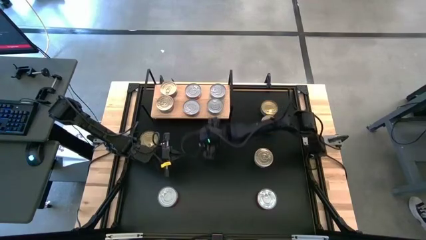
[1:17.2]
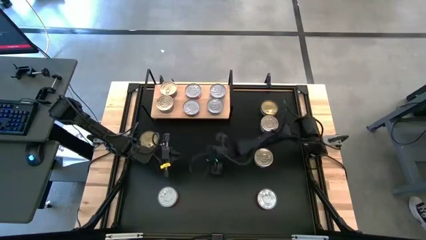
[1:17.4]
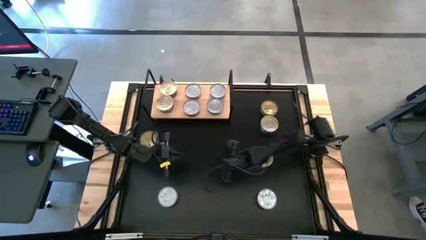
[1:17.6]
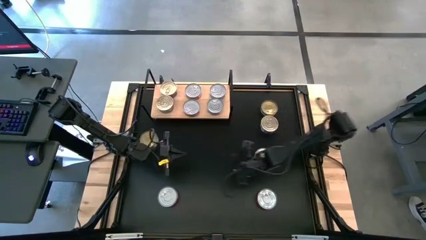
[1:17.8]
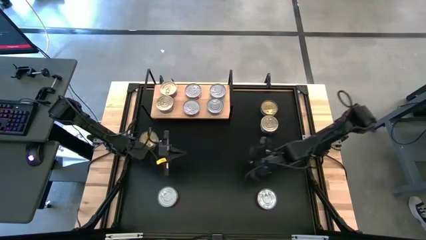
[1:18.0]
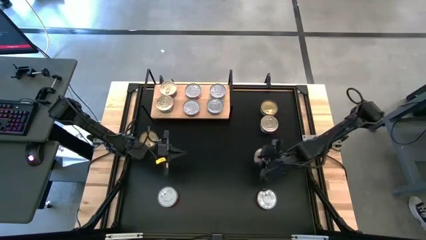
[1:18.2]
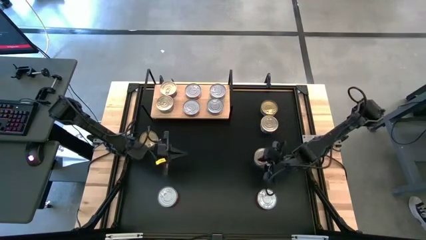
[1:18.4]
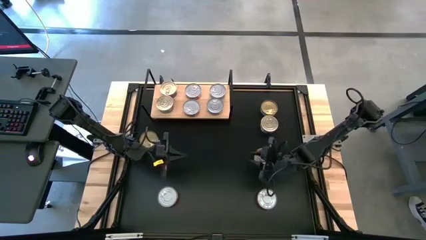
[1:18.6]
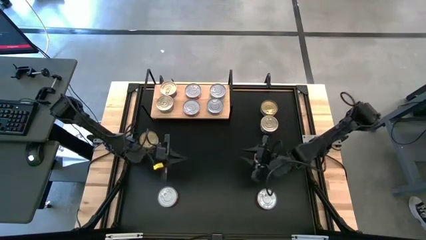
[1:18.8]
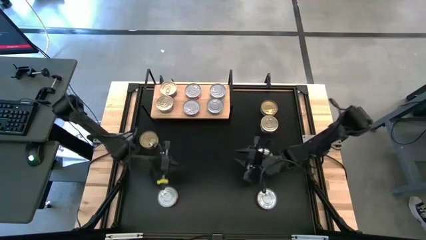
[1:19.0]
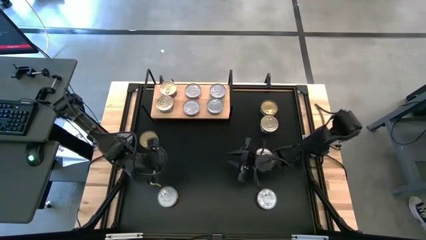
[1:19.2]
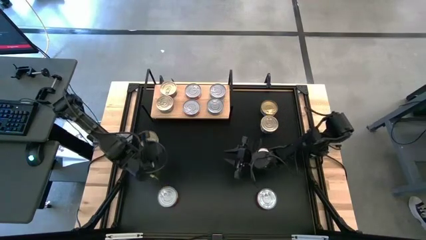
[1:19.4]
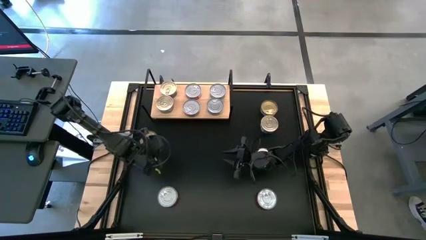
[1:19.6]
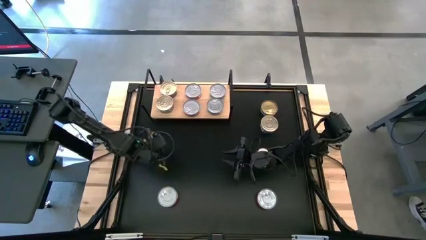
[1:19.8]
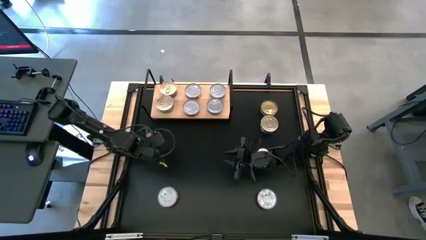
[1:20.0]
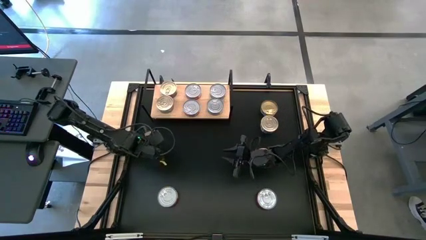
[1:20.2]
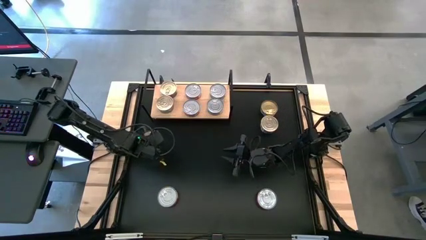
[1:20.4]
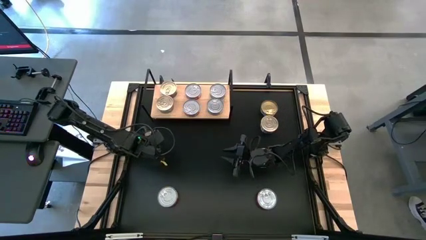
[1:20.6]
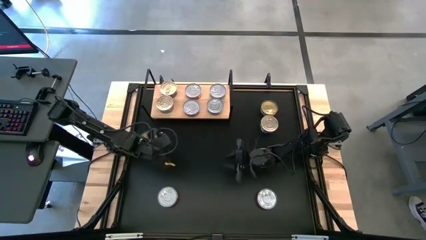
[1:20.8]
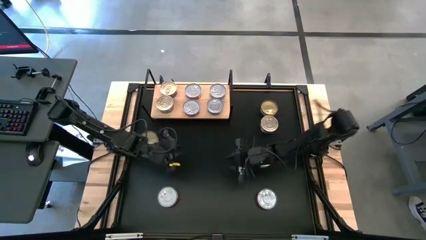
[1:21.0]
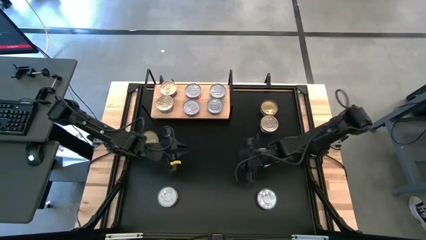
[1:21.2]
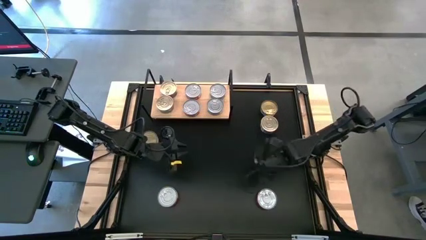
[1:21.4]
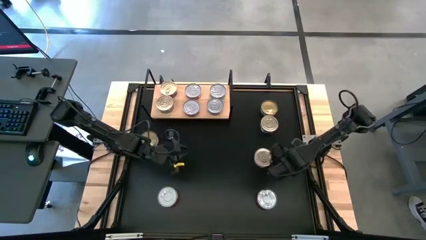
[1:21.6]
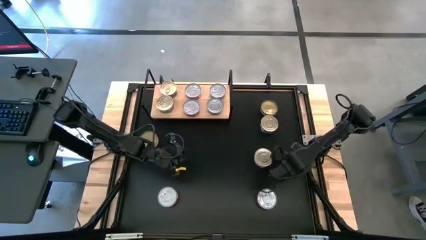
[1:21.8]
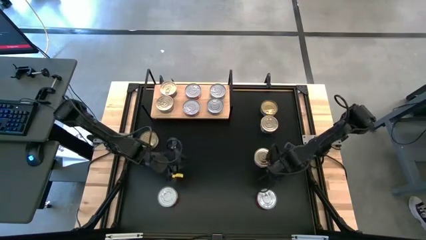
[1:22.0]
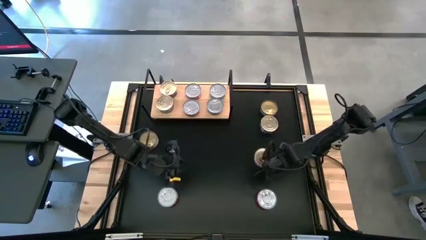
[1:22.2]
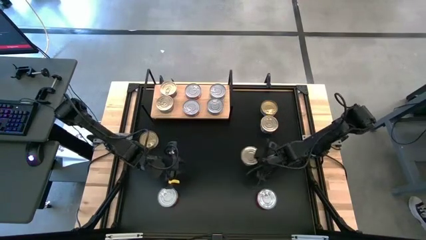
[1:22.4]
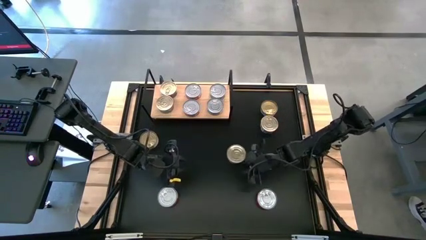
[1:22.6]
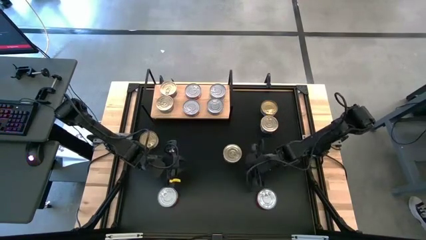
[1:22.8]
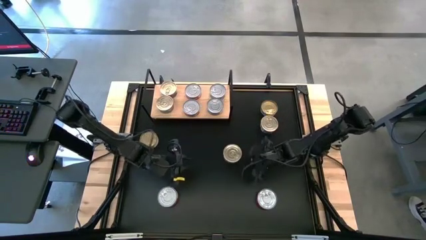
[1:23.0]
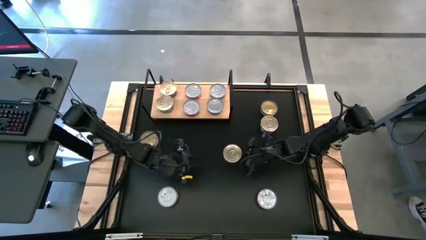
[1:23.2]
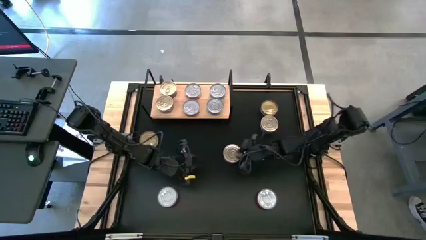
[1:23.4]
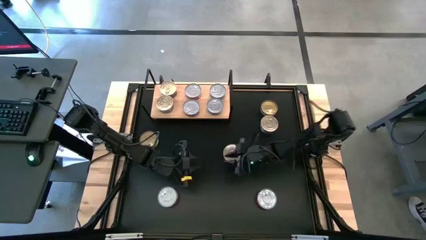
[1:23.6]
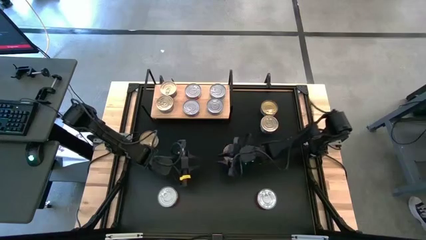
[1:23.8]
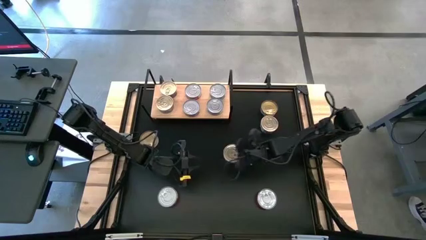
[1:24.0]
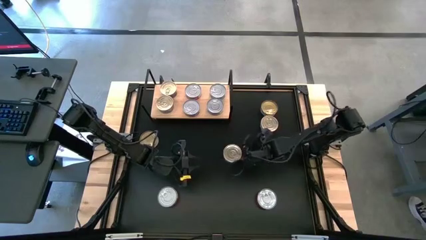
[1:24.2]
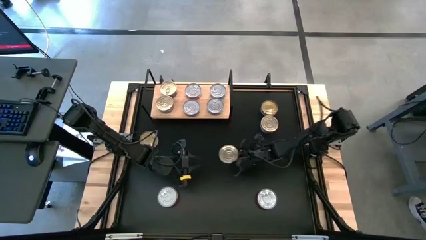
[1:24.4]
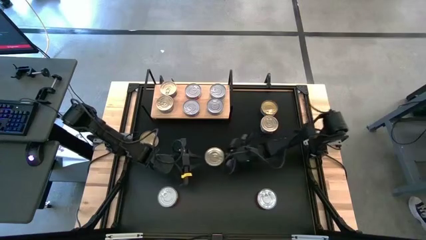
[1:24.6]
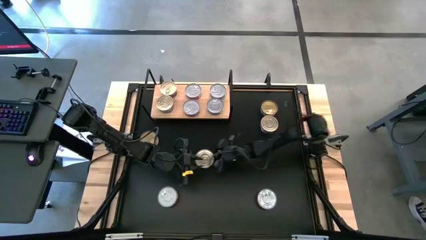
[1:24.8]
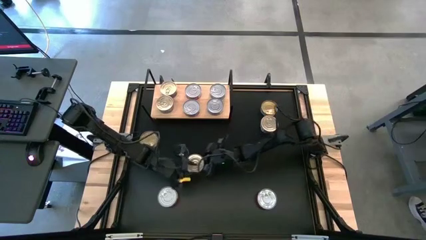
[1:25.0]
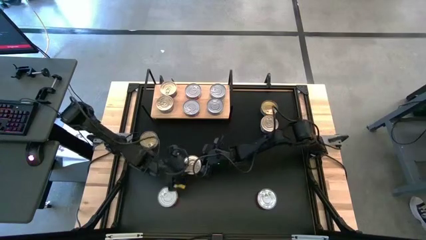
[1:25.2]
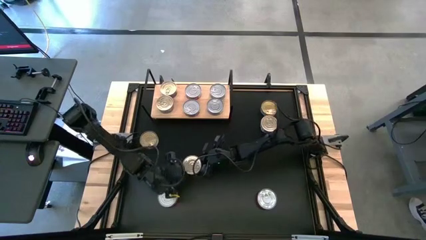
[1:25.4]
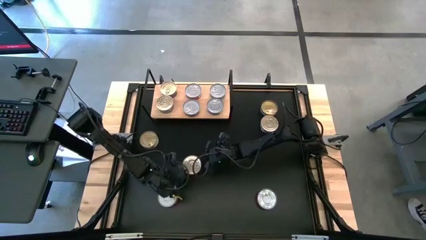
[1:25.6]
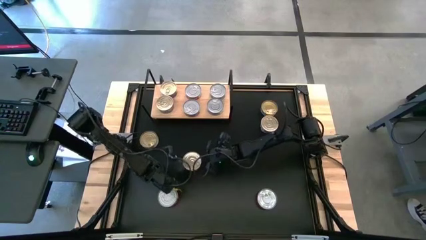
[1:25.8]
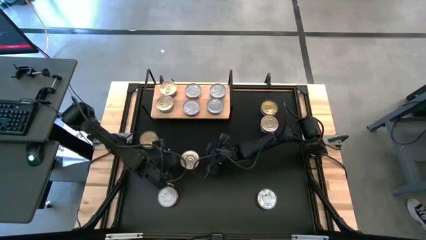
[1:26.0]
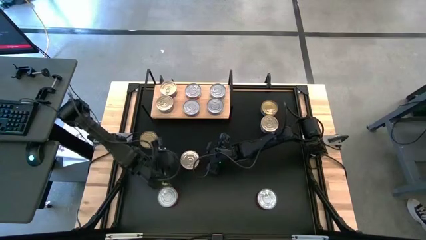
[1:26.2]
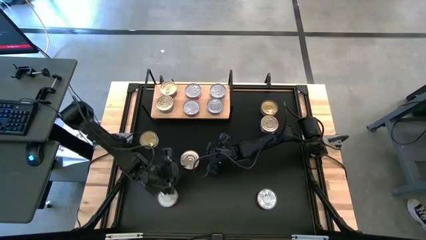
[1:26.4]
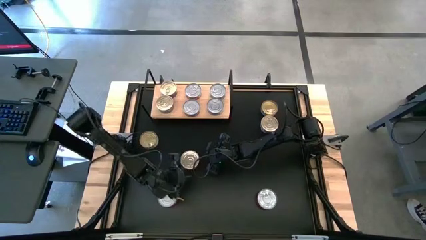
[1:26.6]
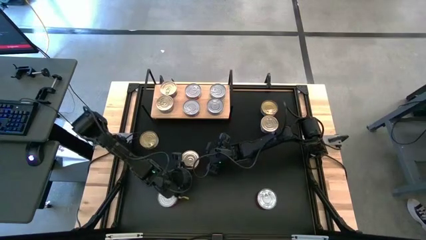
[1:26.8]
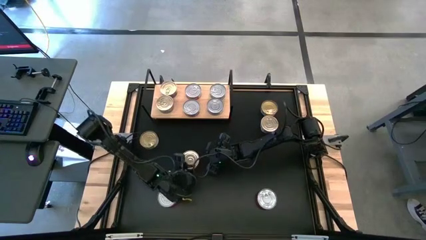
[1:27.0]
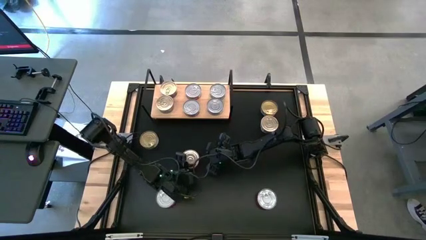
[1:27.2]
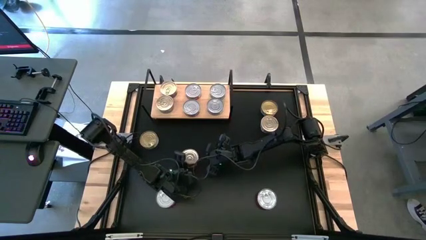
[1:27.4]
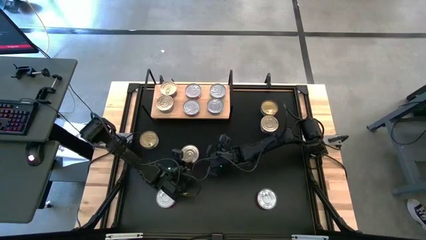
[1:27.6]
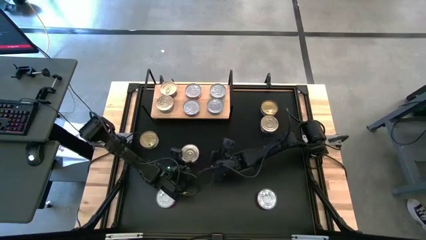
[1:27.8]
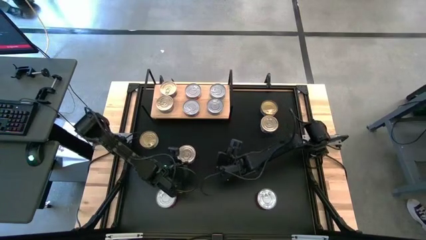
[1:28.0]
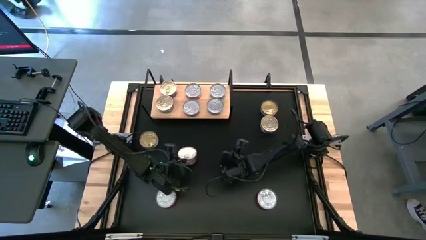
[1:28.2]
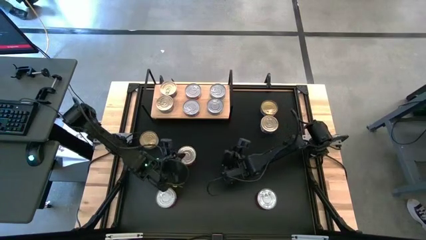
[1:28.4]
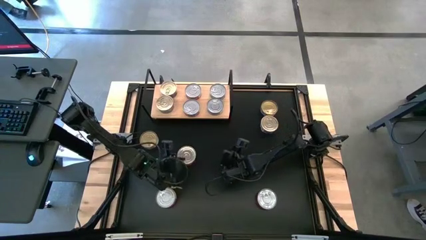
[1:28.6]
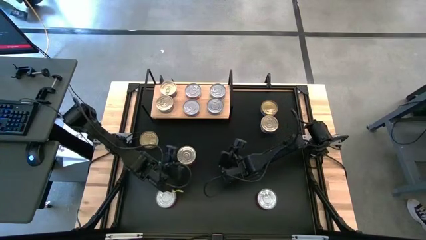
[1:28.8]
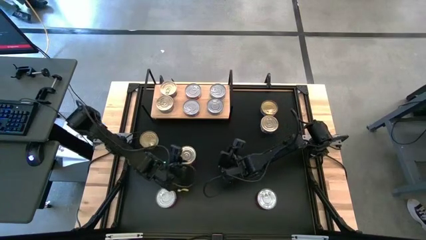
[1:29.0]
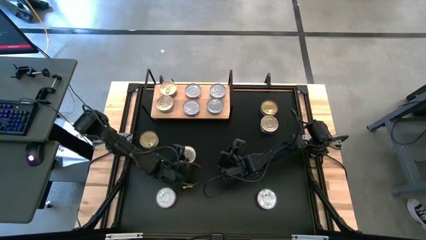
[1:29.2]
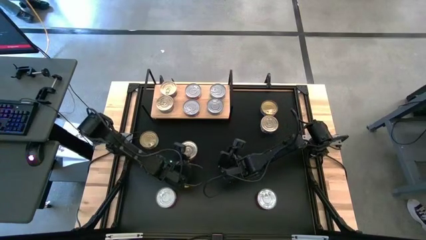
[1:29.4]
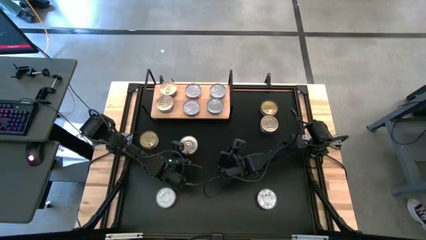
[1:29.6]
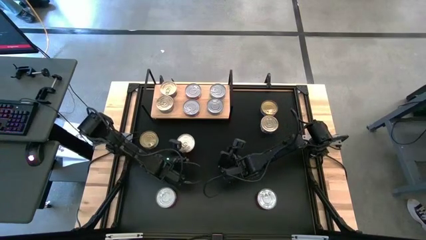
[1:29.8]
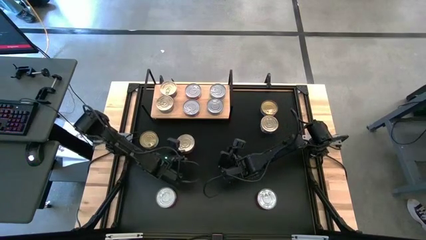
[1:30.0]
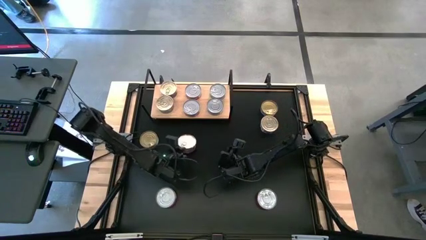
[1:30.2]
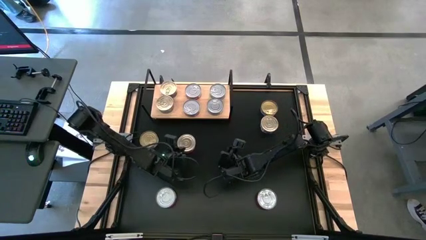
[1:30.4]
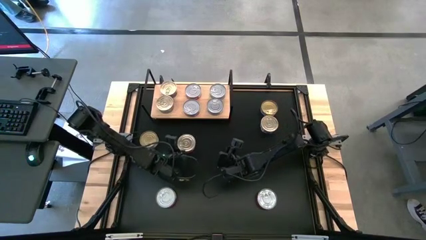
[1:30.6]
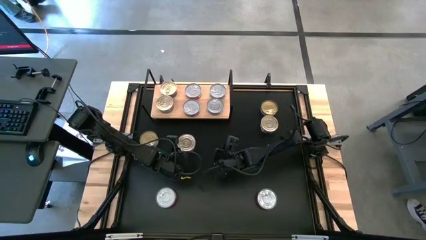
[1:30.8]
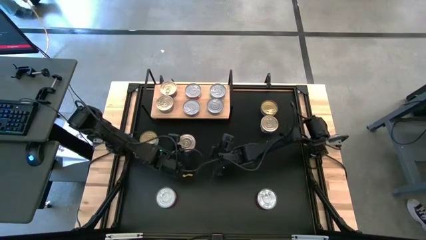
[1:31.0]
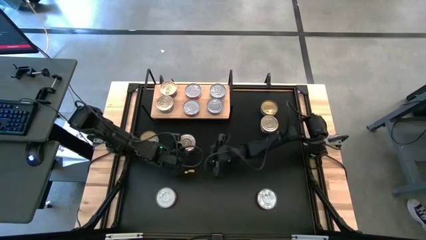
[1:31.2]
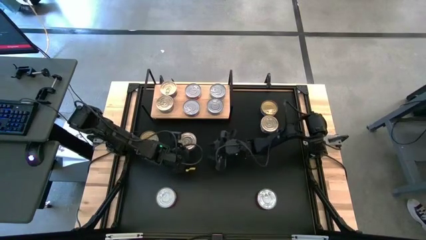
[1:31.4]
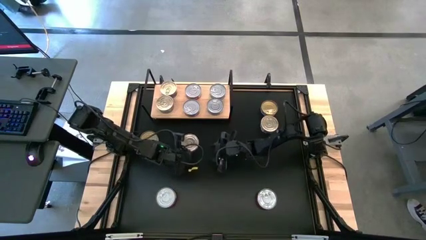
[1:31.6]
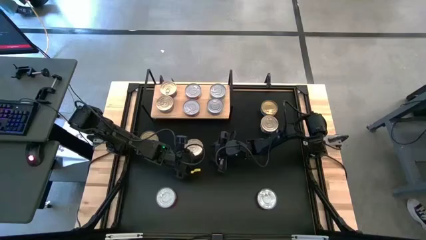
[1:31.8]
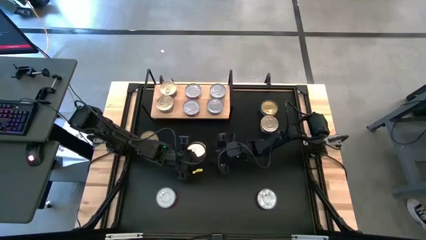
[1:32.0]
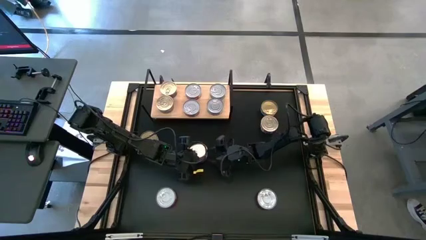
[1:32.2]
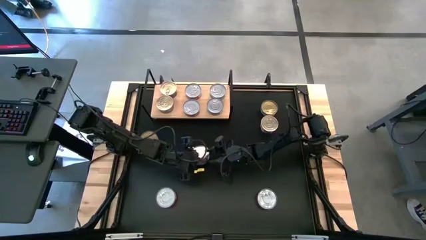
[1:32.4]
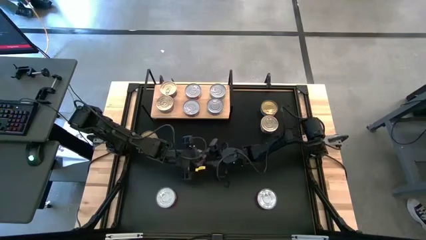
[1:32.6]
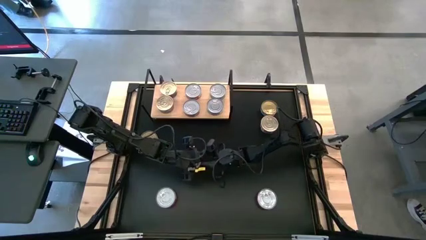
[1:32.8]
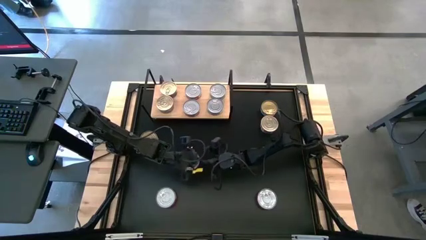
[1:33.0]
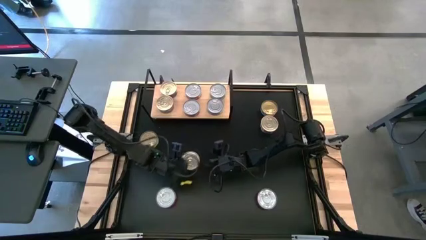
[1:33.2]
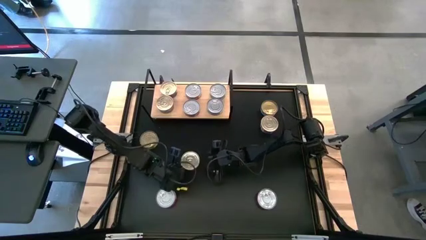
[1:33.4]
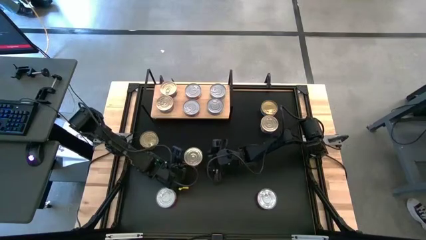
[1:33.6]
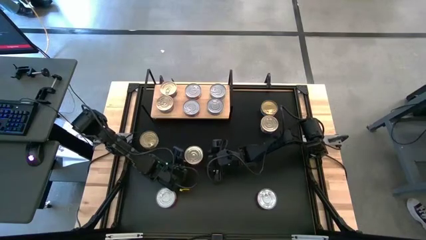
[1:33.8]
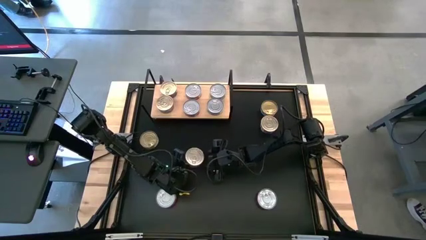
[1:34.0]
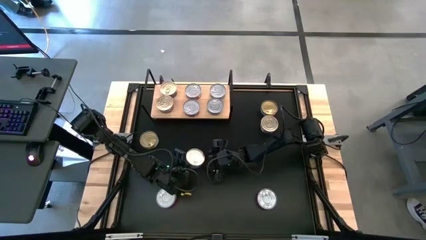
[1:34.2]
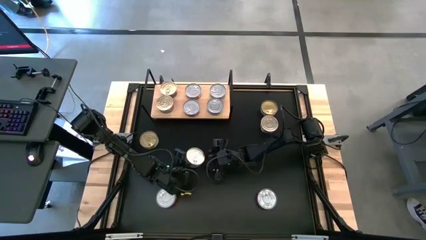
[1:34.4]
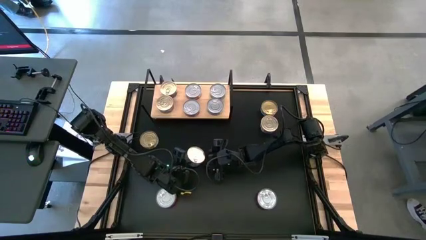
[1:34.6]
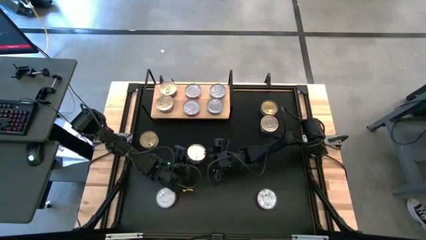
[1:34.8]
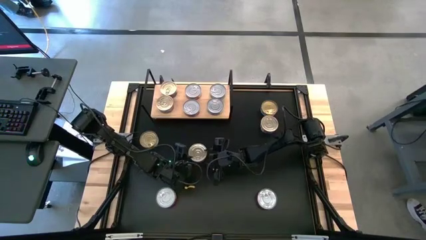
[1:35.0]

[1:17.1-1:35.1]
Task: Stack canned seafood by type on shelf
Stack the bottom blue tuna can on top of the blue tuna can on the shelf
